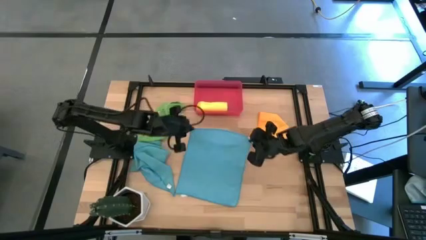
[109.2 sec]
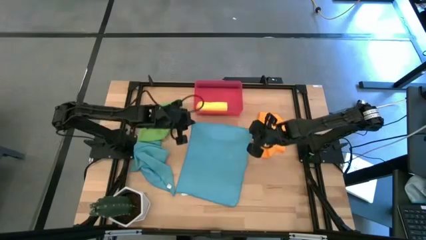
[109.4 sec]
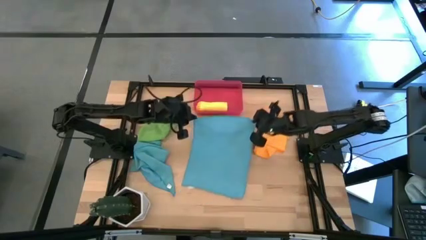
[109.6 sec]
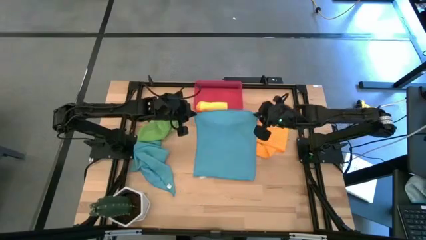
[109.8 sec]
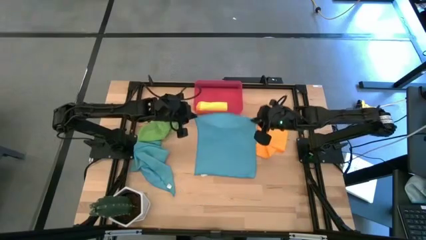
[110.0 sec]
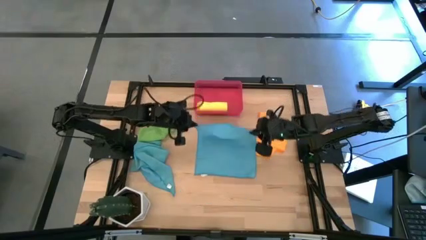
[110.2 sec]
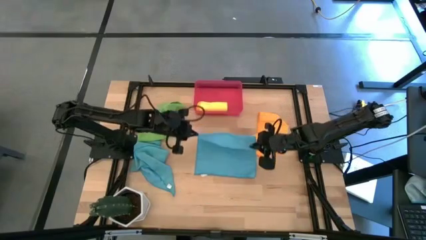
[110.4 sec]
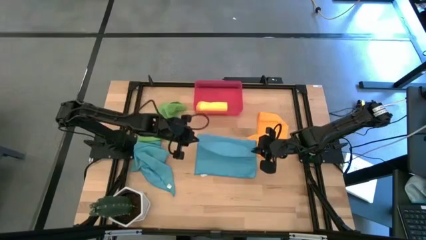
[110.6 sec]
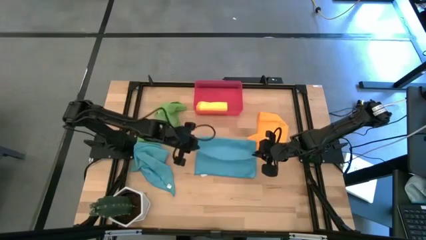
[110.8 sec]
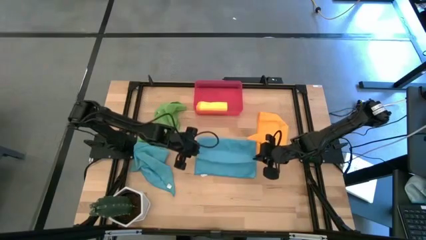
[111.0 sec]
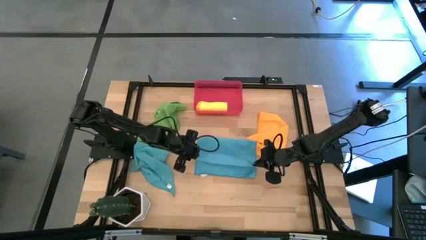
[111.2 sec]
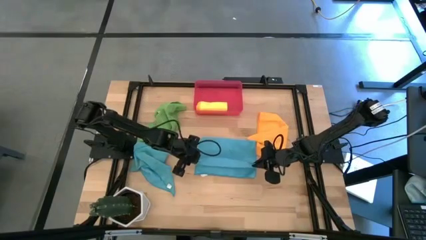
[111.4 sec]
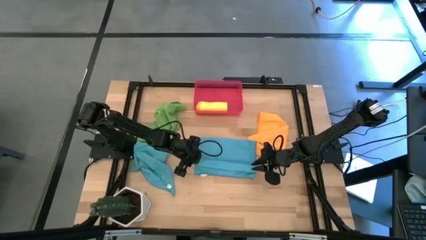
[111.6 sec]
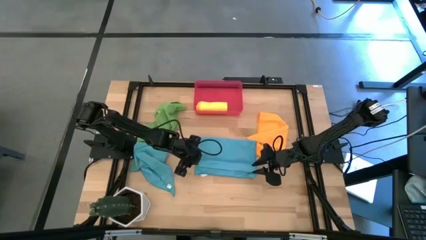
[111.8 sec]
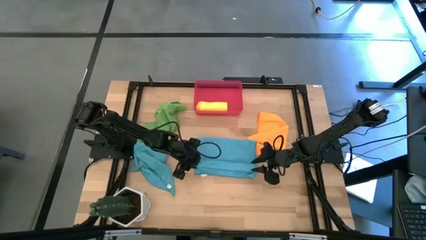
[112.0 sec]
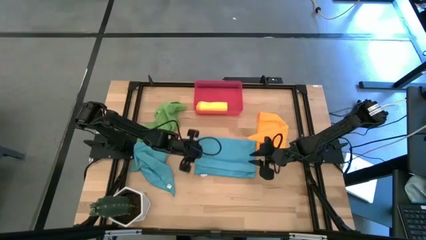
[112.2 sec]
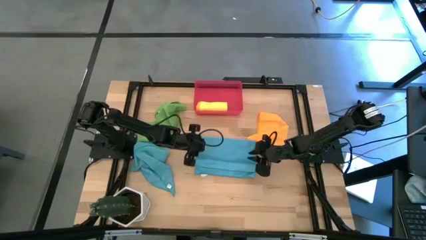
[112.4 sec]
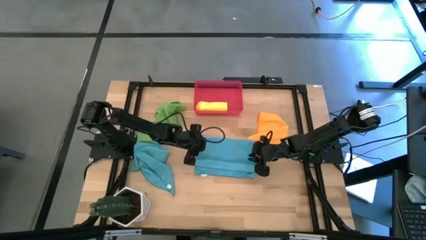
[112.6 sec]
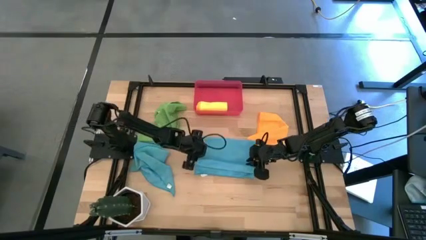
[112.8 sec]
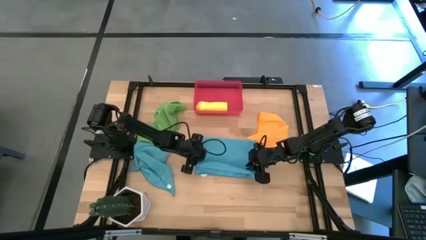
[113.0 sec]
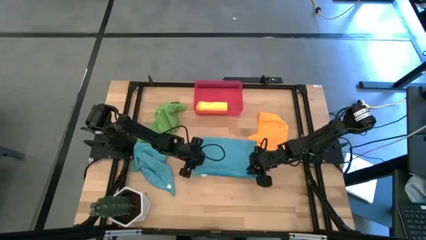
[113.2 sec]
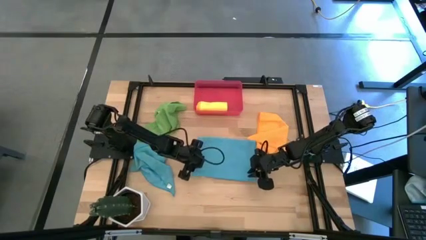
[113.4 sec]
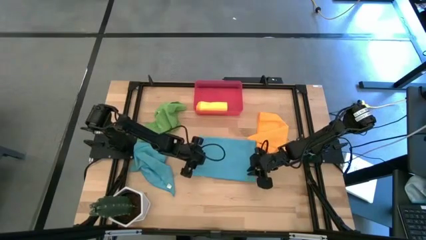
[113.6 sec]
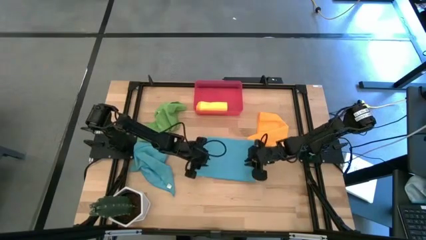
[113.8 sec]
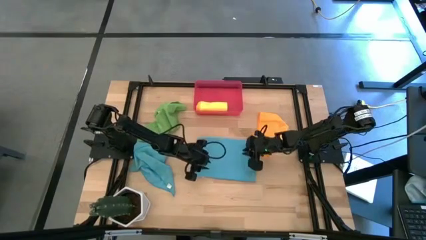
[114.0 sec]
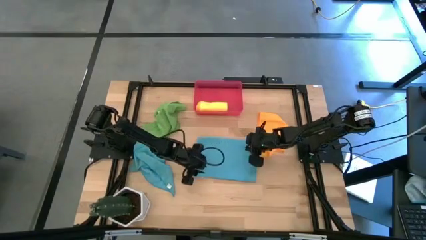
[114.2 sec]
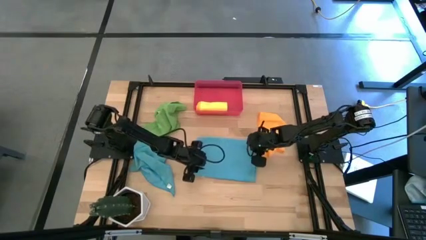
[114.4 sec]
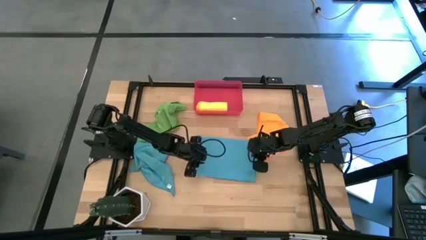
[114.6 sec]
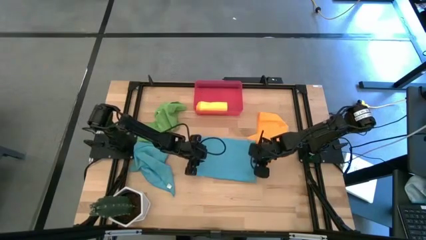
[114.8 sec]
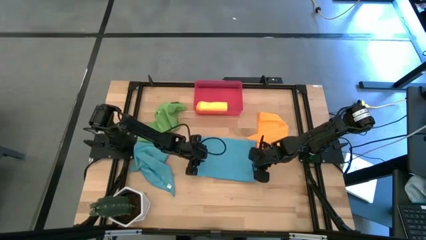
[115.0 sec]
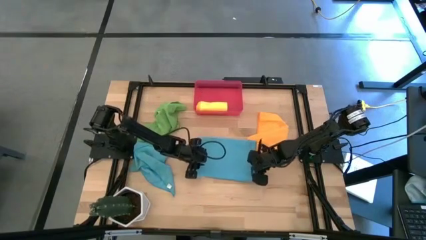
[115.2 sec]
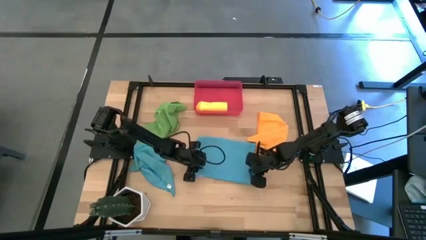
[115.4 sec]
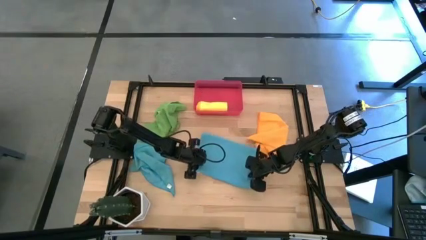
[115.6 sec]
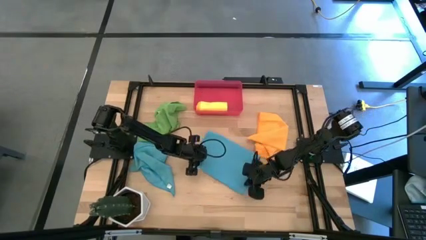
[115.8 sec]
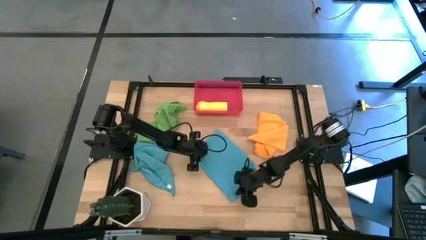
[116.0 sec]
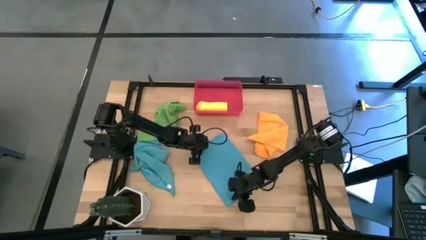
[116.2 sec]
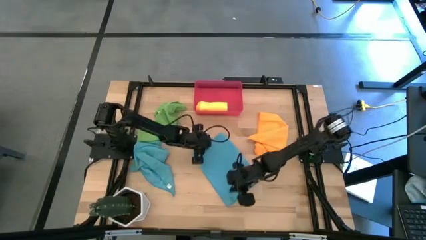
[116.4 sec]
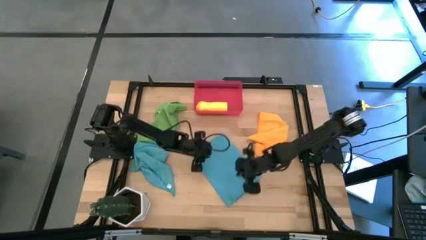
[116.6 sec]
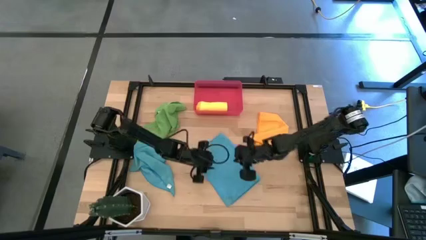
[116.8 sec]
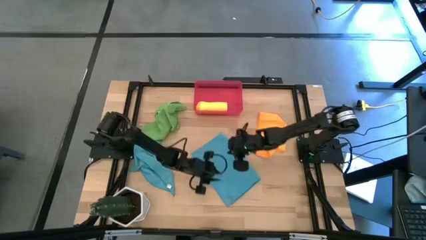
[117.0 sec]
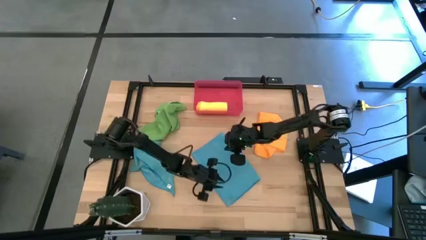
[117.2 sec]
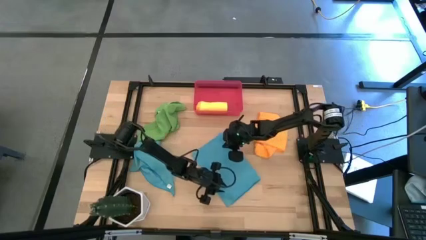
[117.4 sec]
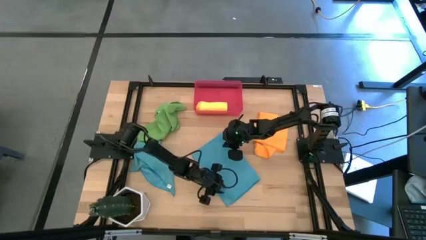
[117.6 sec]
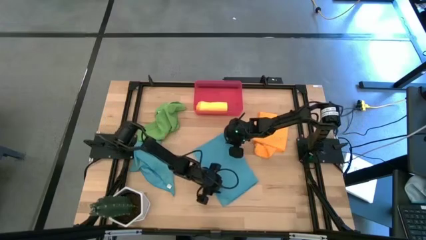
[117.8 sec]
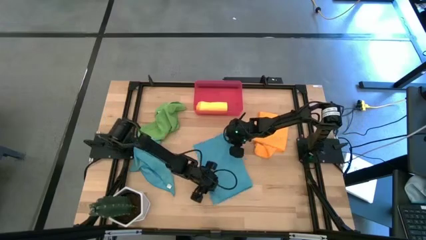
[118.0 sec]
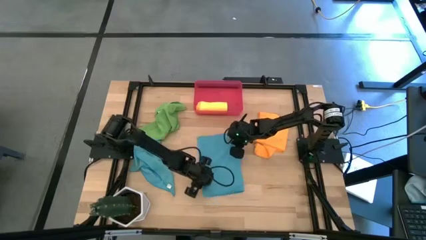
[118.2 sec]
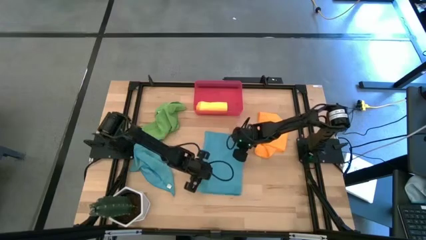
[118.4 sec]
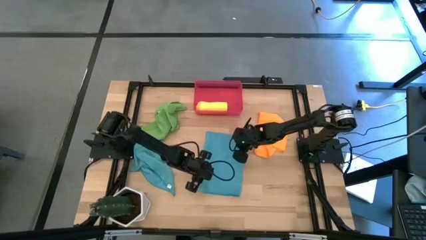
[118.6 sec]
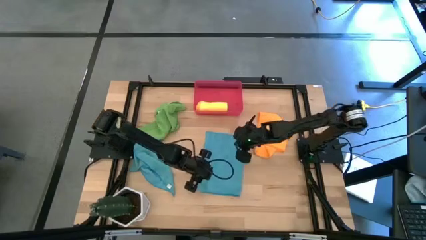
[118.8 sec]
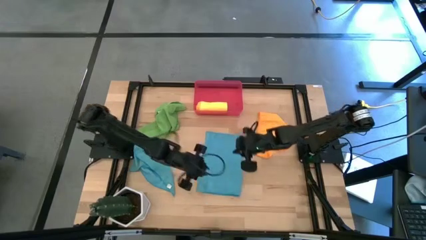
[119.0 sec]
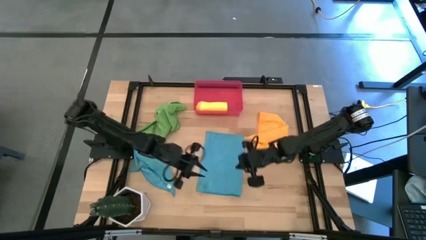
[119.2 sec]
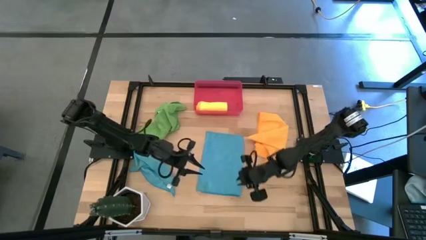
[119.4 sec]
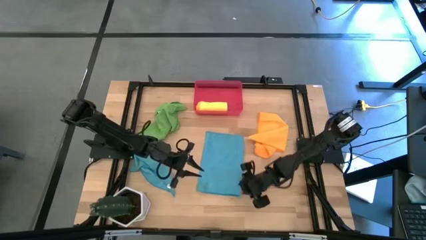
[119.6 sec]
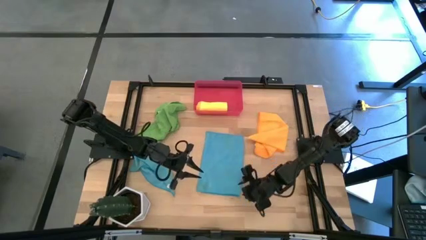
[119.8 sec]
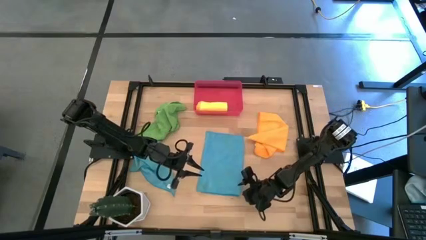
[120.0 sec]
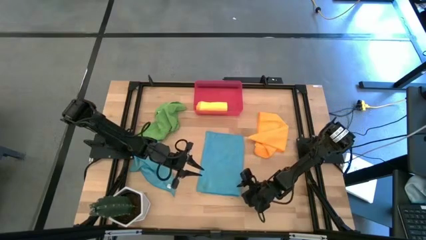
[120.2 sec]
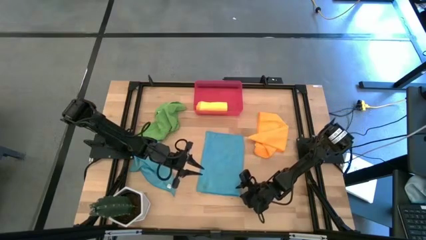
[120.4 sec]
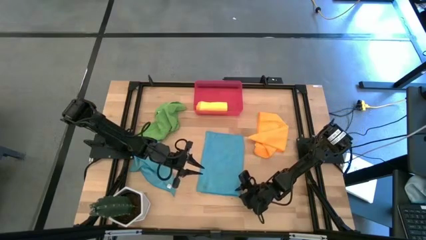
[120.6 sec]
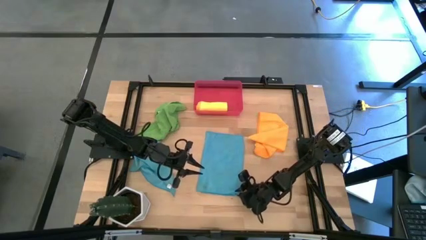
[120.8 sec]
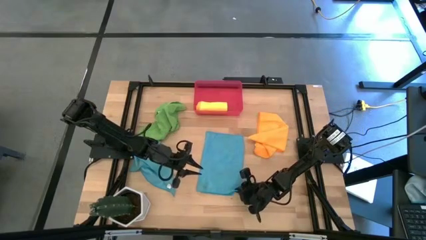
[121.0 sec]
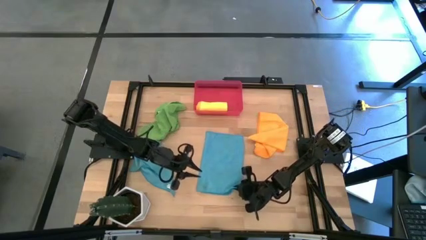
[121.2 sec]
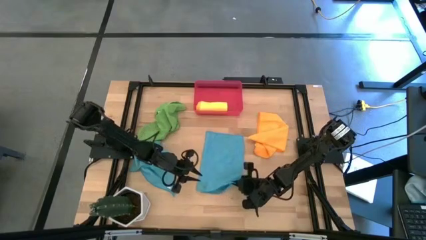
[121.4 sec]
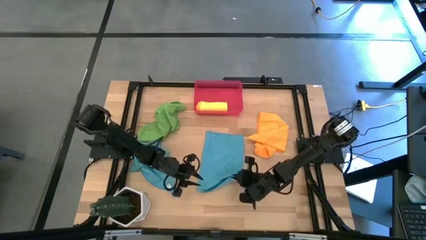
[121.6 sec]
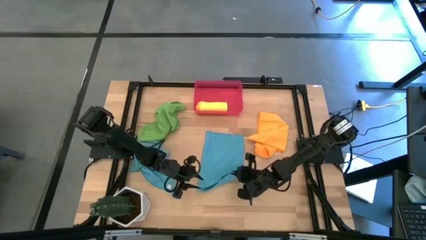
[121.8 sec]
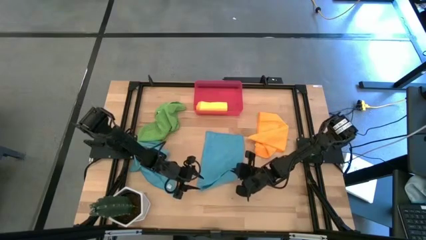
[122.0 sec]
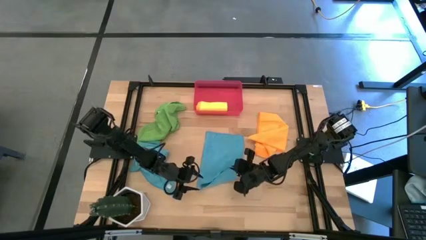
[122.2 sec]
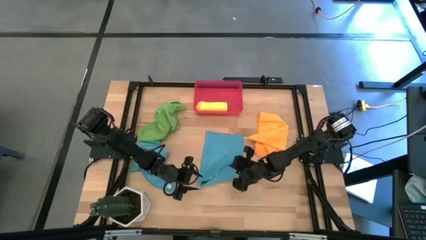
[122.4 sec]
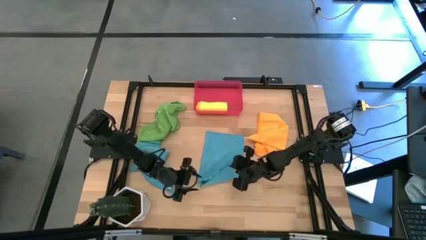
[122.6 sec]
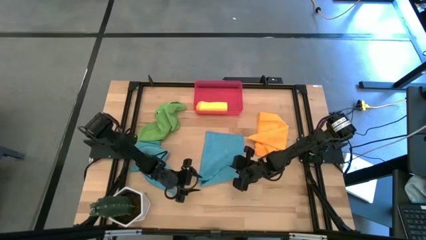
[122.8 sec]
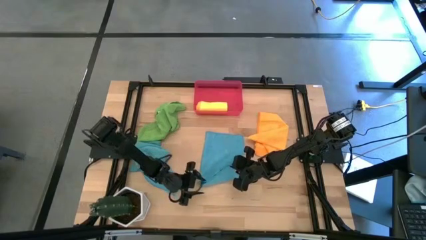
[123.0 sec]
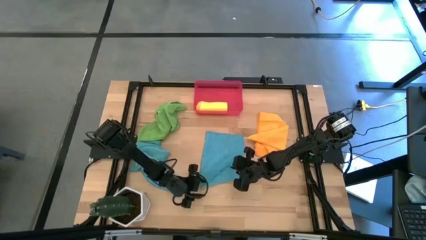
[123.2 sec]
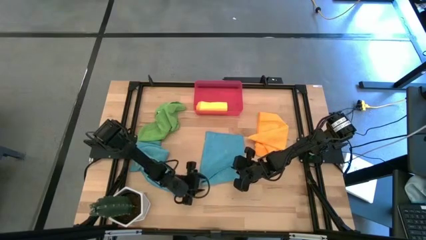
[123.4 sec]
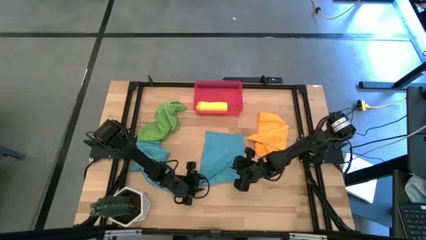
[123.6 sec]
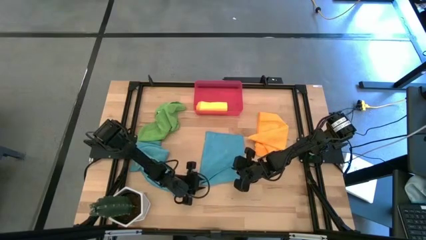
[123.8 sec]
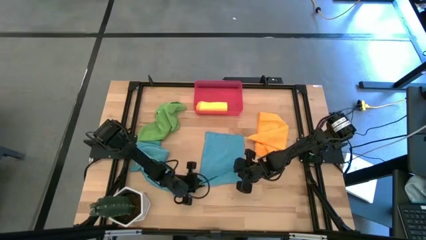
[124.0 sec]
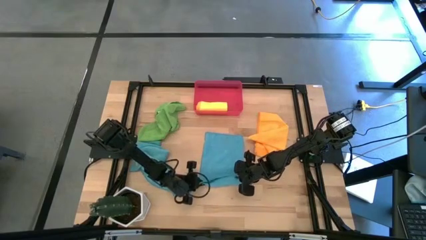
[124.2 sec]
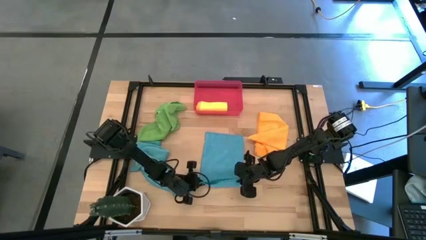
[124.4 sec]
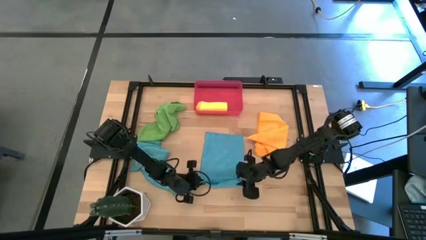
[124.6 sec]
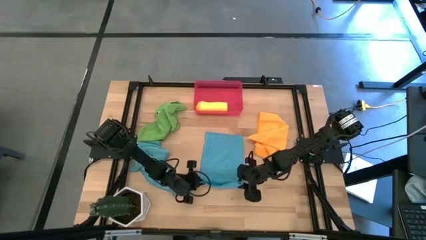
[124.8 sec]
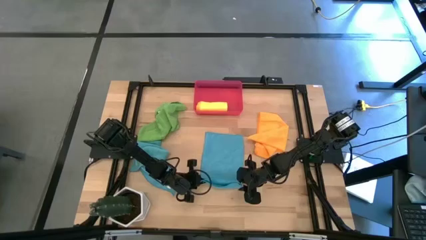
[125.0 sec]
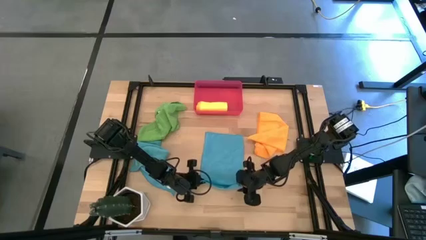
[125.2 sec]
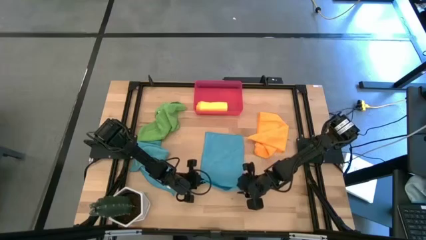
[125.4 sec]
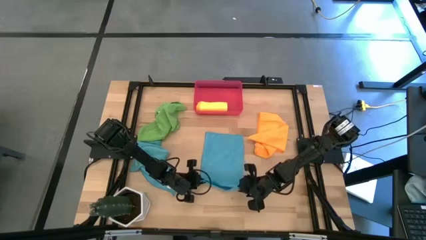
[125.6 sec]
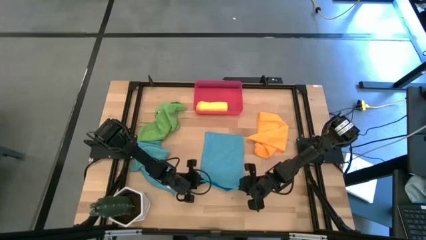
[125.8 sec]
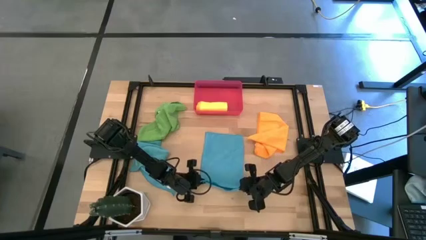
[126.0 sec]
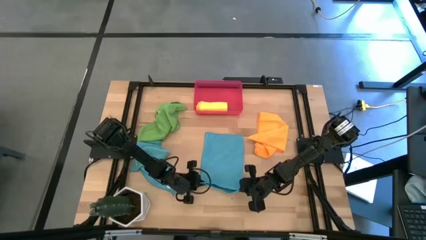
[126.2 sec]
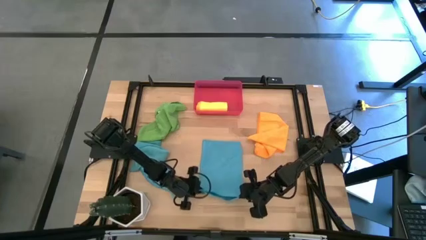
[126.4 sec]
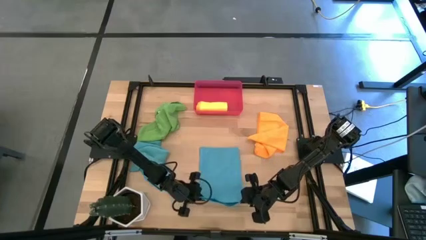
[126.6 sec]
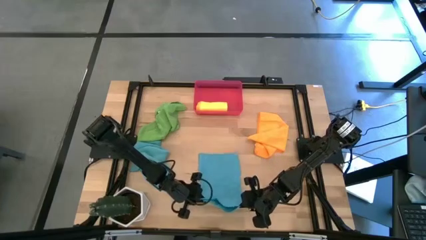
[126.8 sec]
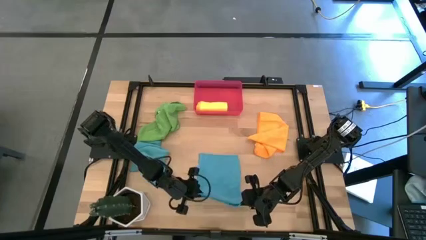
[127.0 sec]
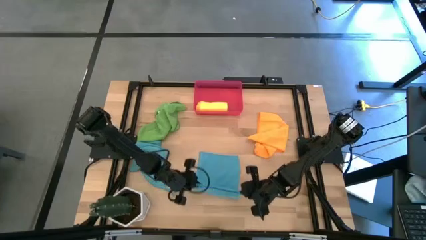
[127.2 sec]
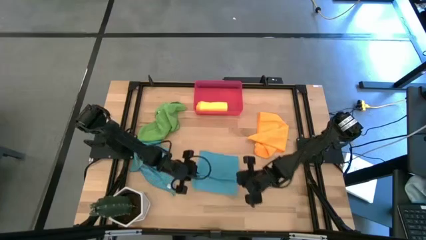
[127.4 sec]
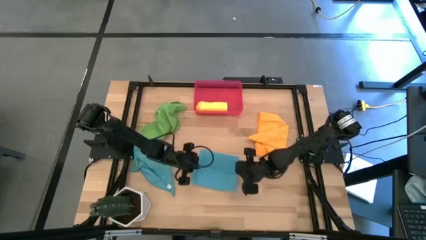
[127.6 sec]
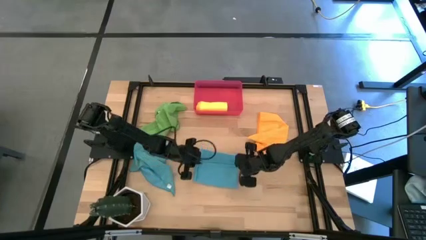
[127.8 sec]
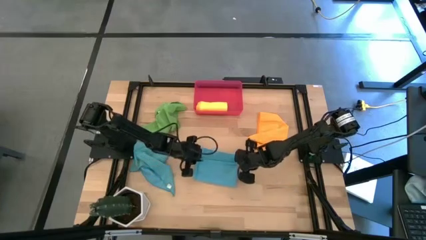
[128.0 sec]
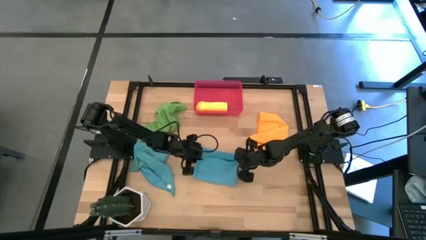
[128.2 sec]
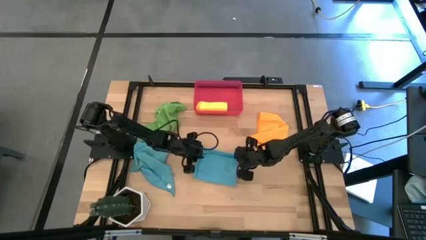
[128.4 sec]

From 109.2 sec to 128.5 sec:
Task: Roll microfiber towels into tight, uniform cylinder then place into a basket
Roll the left blue microfiber cloth
